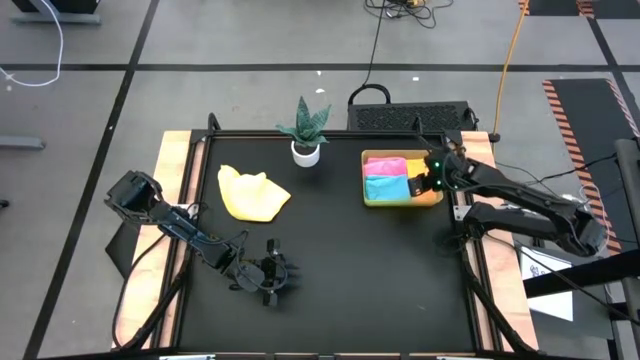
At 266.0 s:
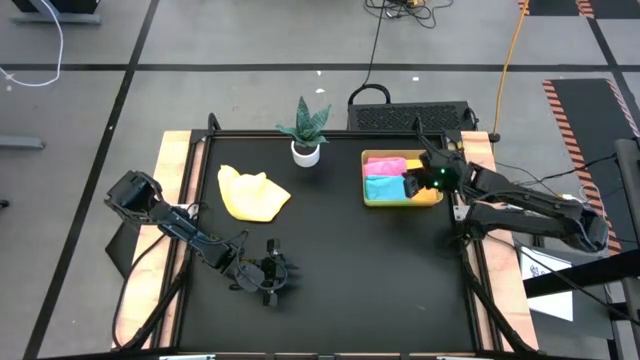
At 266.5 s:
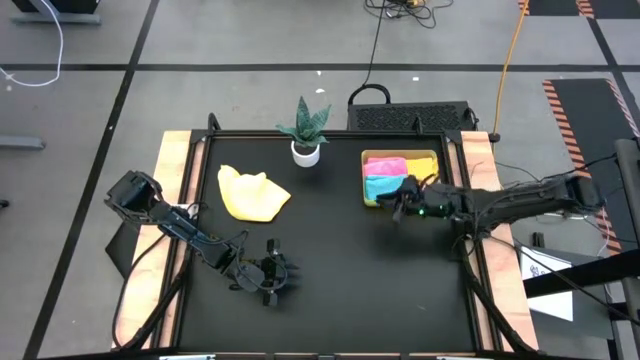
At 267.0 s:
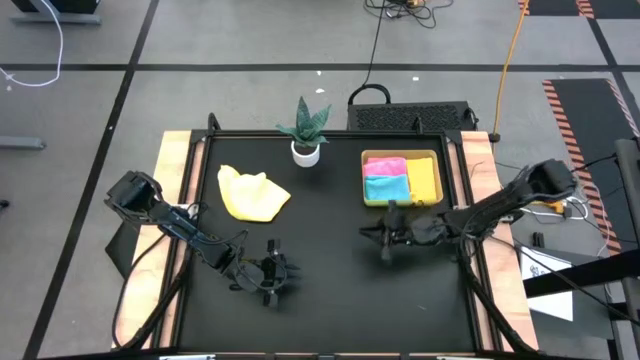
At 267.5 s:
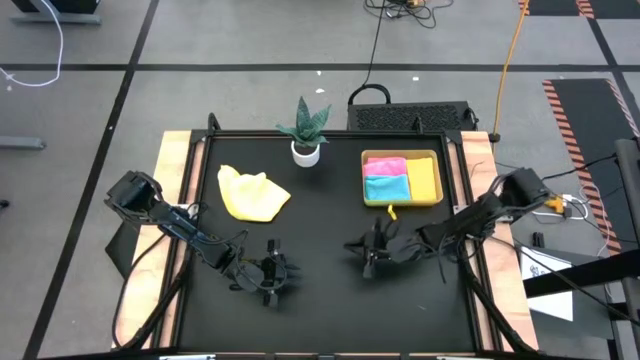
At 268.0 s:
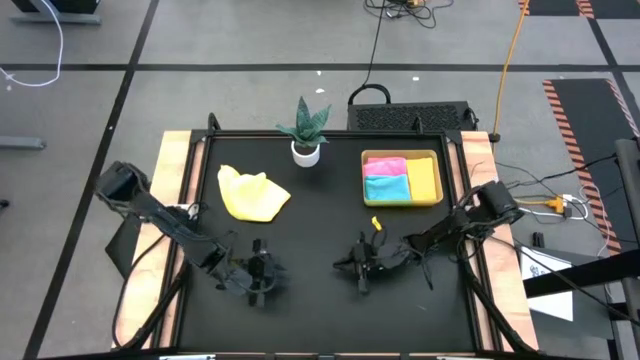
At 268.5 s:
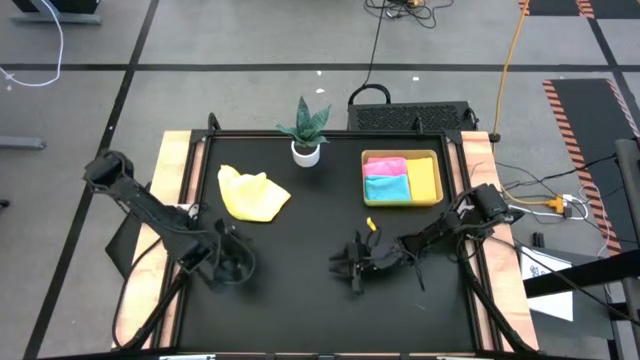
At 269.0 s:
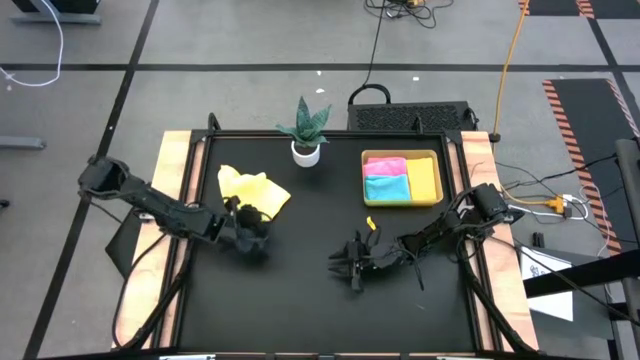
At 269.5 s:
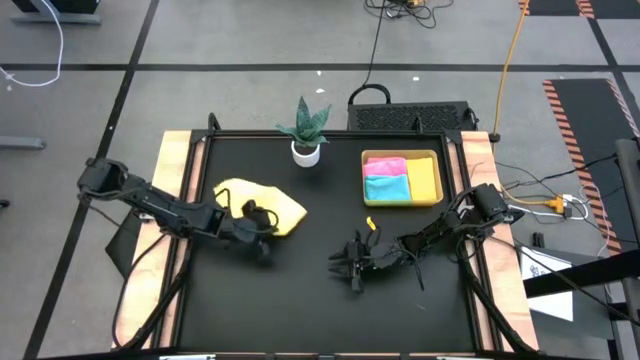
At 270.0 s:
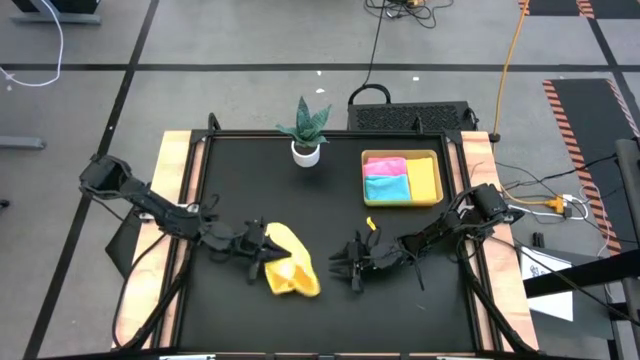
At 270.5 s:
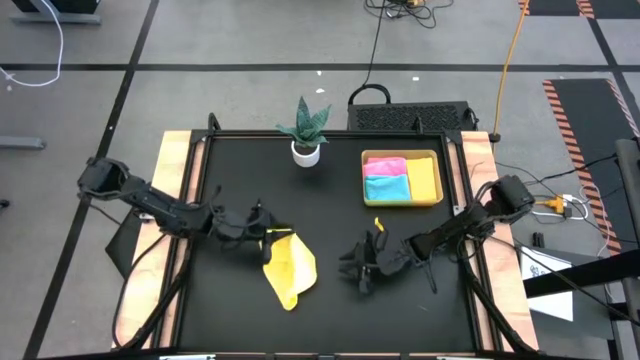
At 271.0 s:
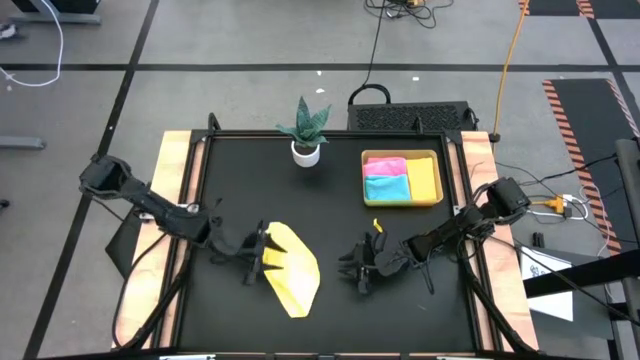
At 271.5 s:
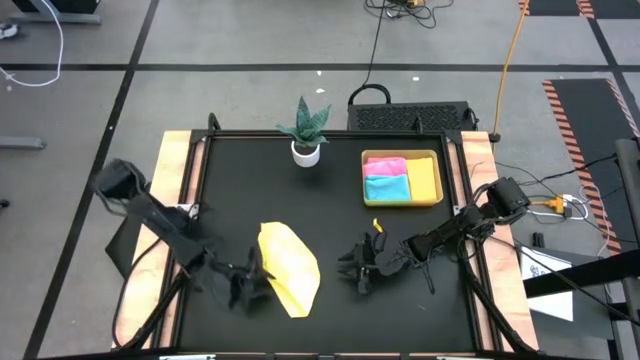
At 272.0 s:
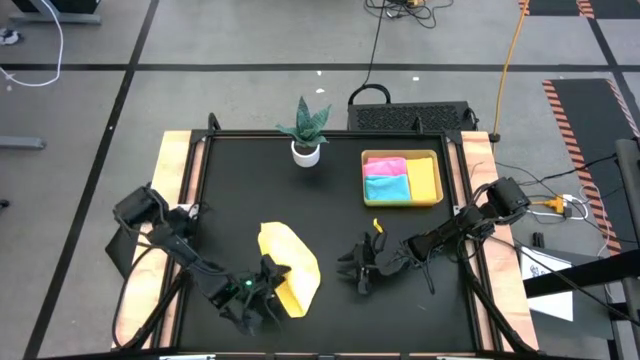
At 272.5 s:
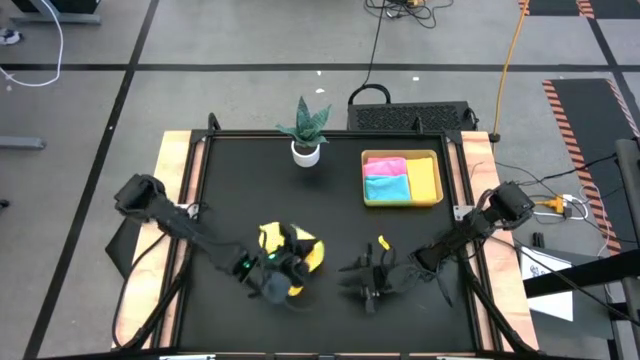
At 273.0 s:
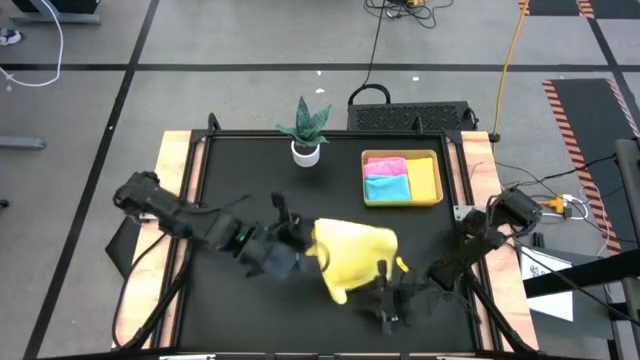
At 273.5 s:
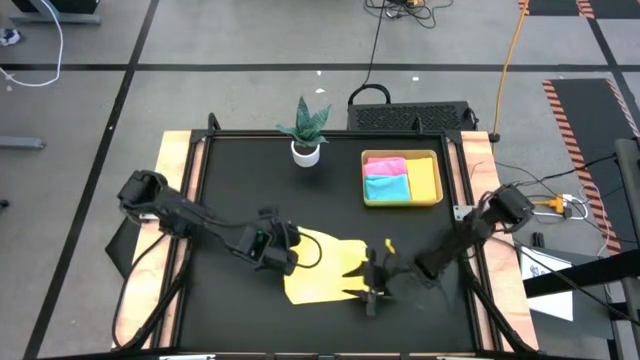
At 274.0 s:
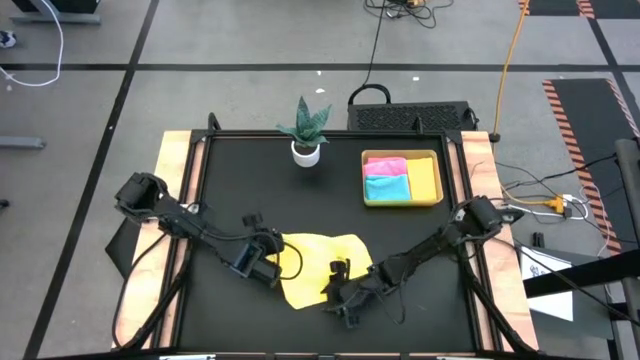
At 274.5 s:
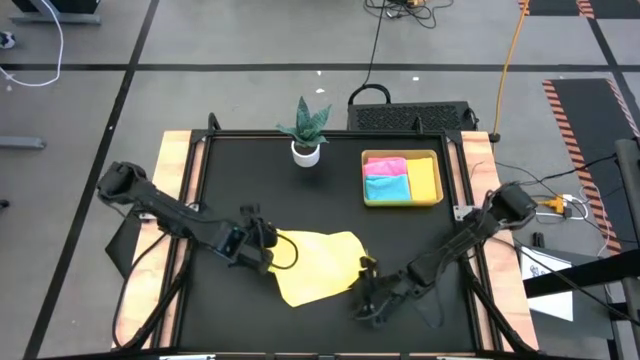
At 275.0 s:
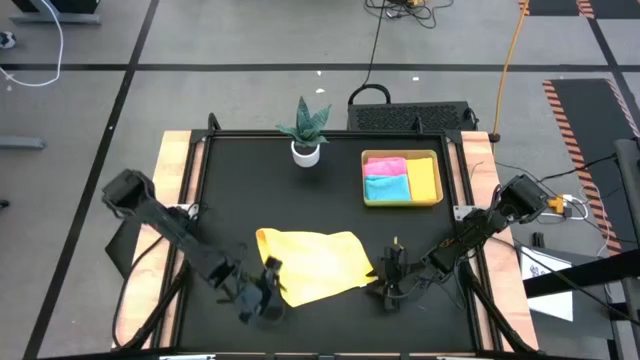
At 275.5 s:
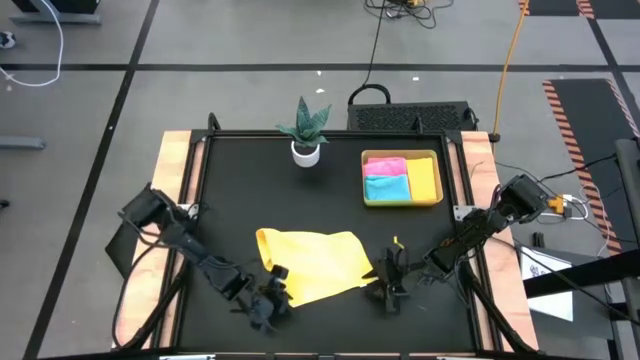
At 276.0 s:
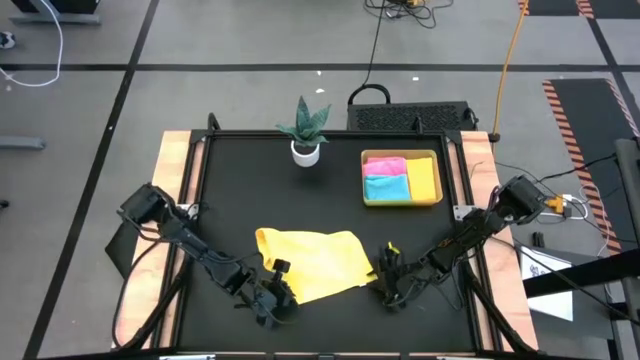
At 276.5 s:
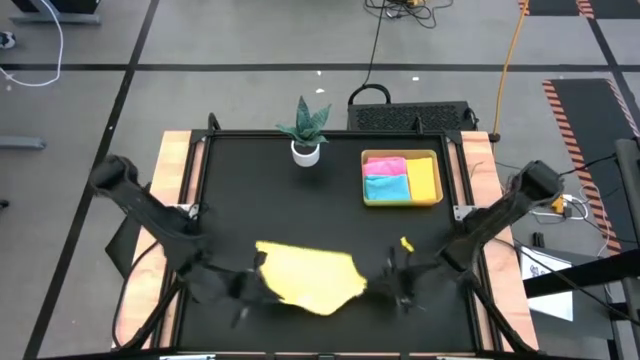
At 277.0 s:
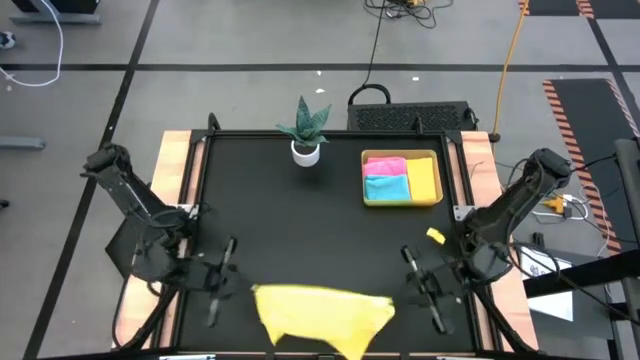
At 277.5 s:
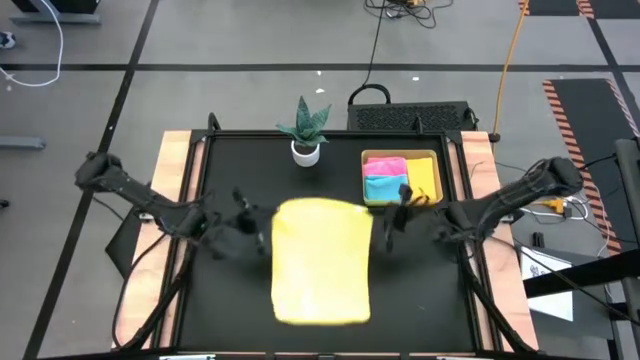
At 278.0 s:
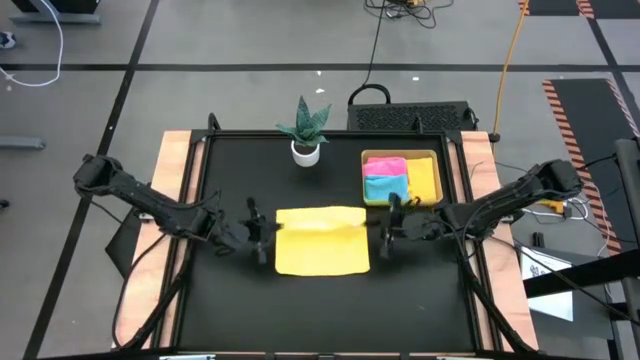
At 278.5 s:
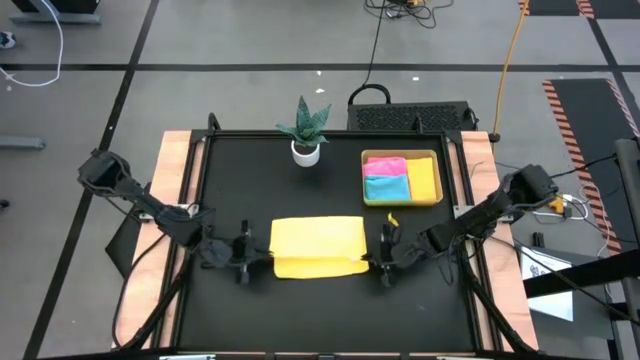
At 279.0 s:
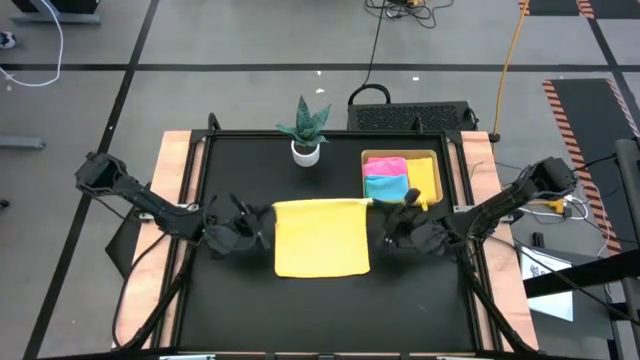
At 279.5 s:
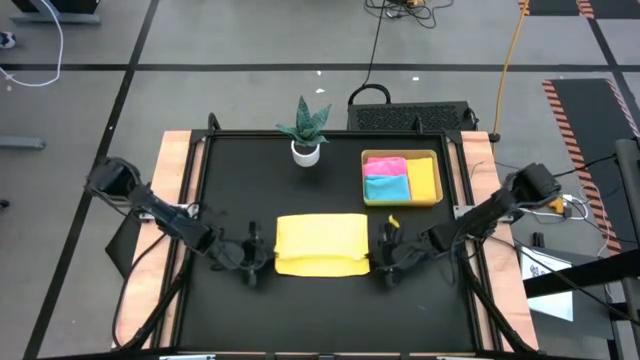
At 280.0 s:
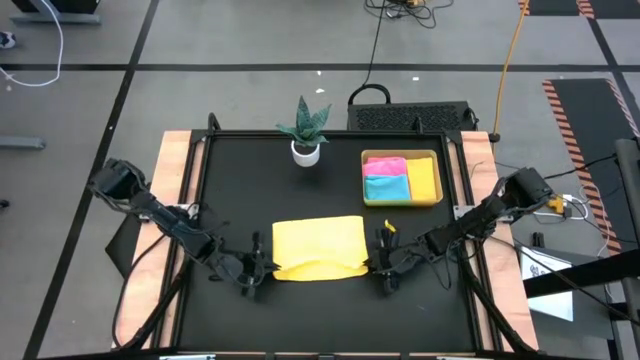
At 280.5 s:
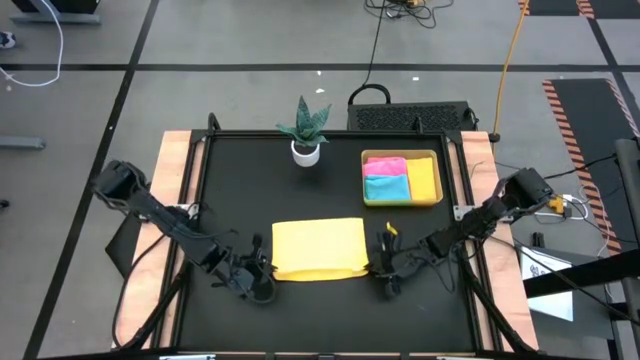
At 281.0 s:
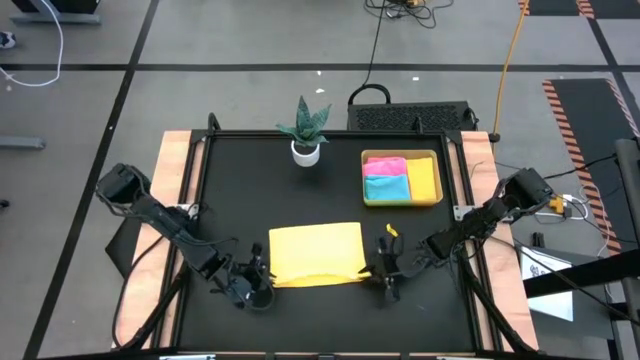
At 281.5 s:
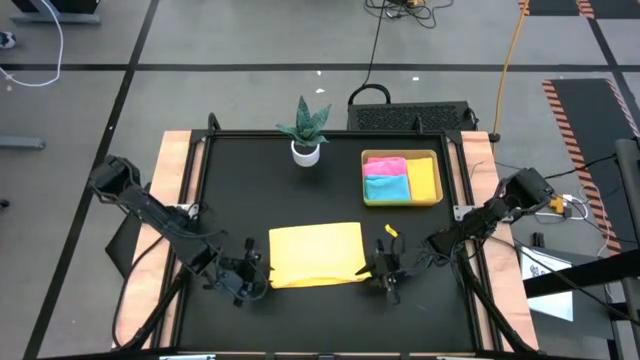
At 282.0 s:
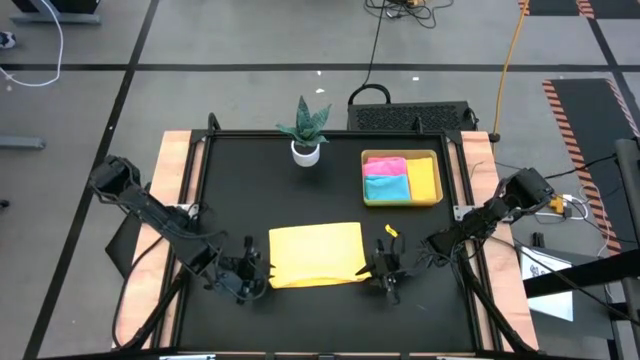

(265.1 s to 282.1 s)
Task: Fold microfiber towels
Fold the yellow microfiber cloth

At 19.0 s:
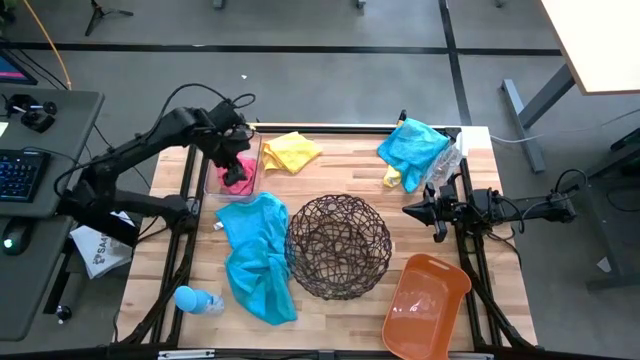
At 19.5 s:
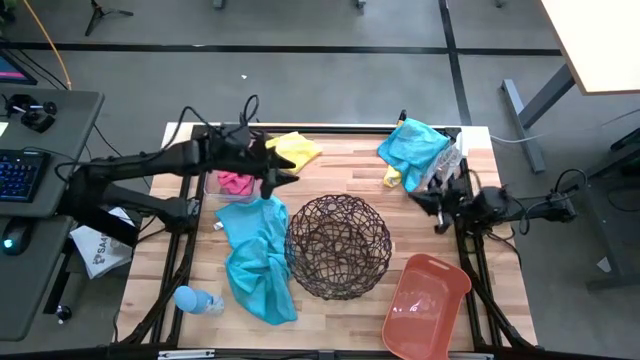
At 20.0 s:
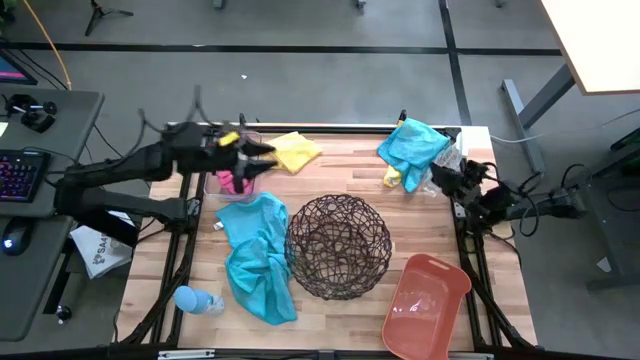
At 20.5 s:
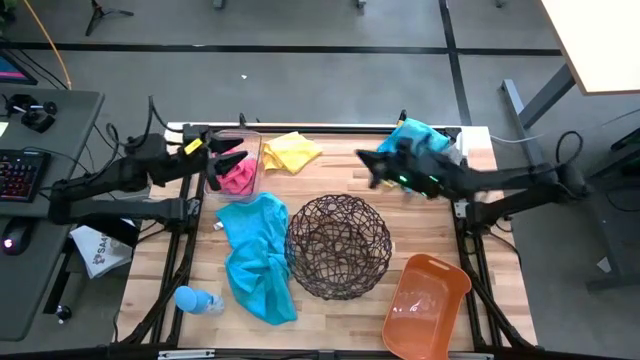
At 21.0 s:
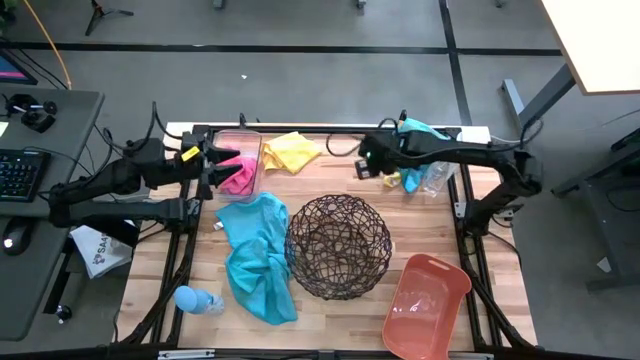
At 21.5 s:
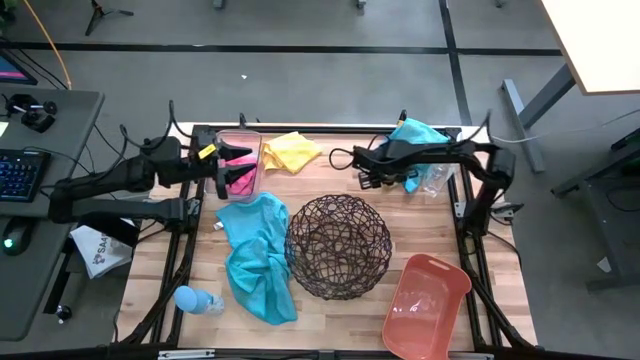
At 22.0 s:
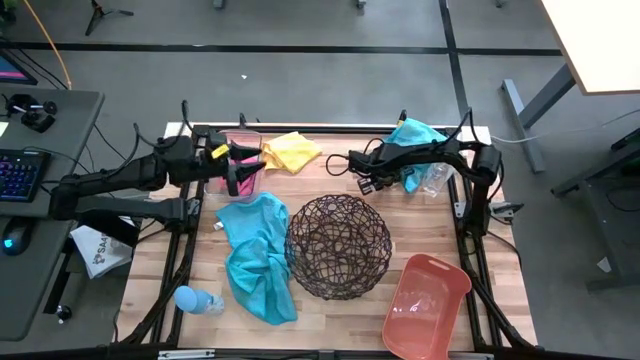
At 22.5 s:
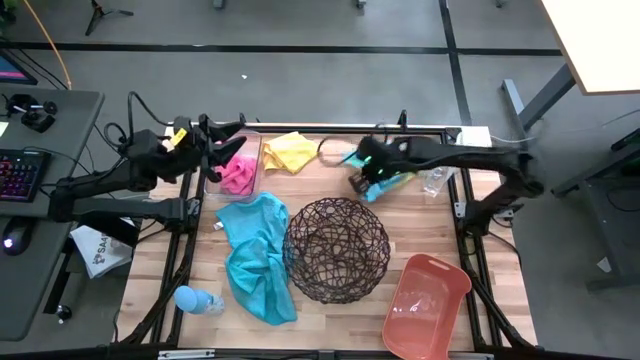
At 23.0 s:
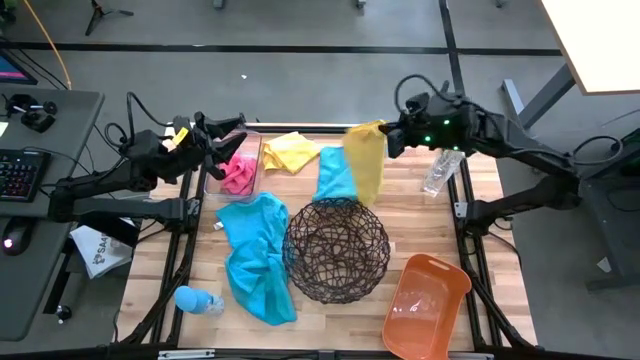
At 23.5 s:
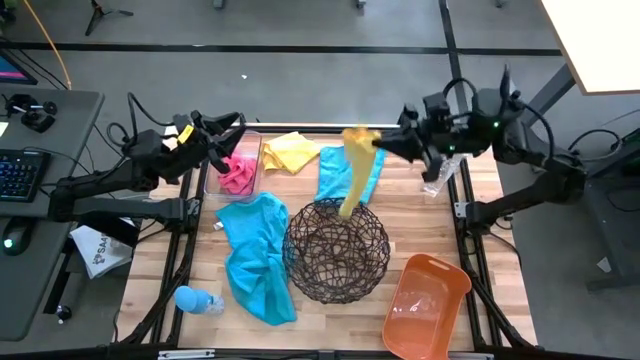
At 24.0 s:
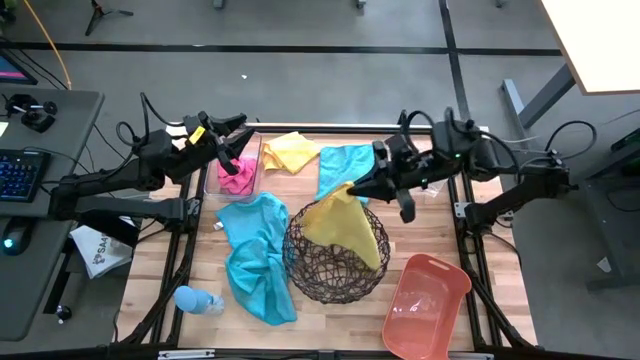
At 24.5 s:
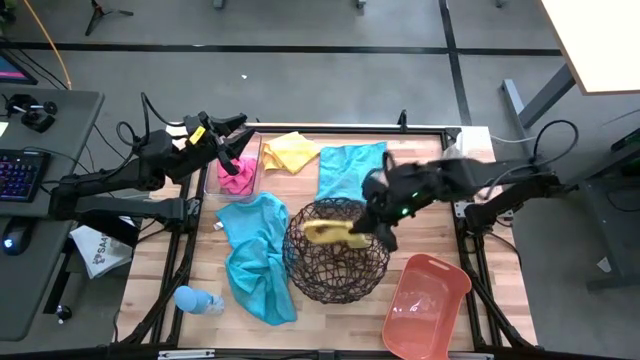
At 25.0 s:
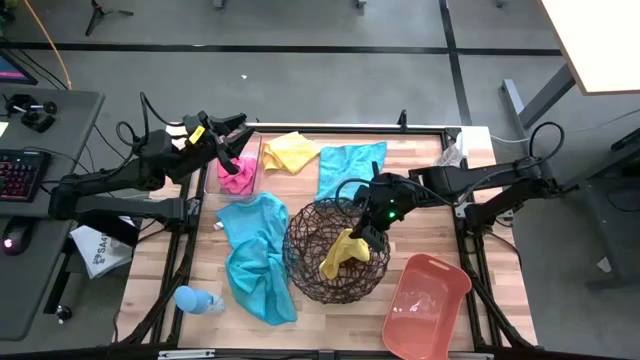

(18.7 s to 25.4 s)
Task: Sort microfiber towel by color & place in baskets
Put the right yellow towel into the black basket
